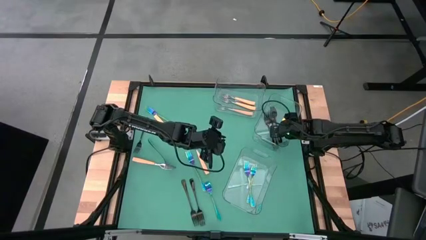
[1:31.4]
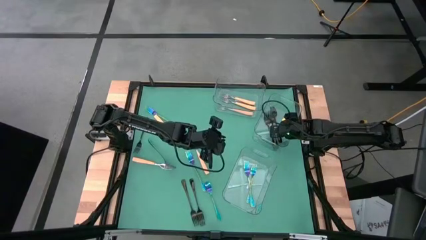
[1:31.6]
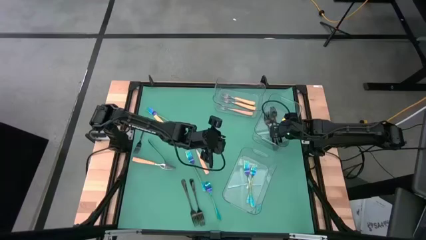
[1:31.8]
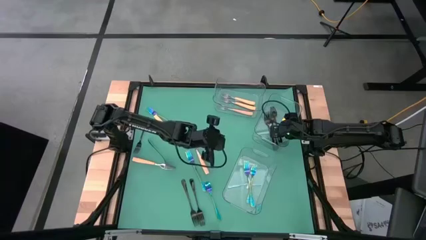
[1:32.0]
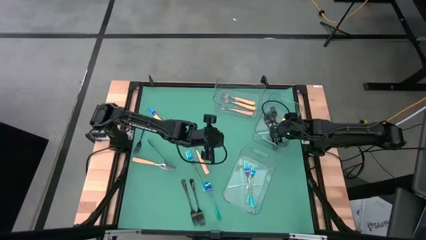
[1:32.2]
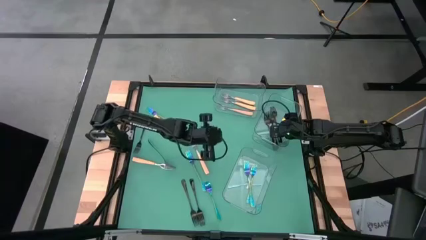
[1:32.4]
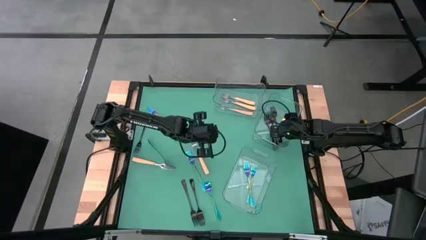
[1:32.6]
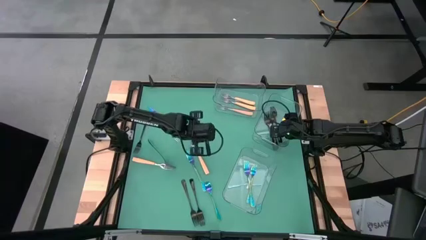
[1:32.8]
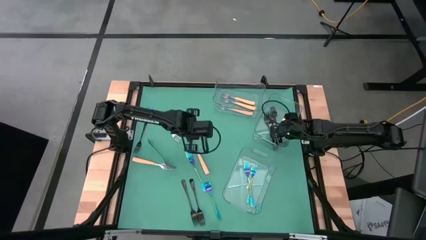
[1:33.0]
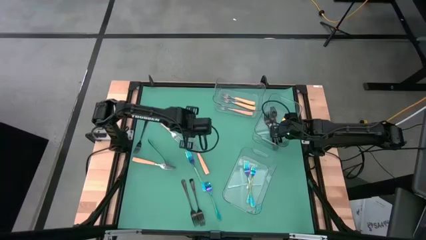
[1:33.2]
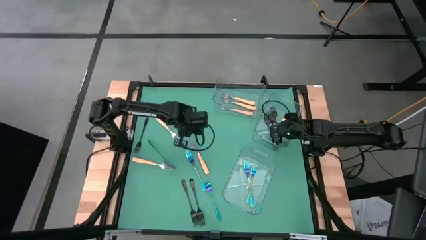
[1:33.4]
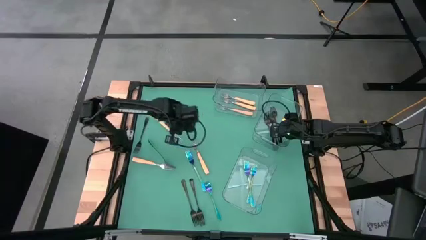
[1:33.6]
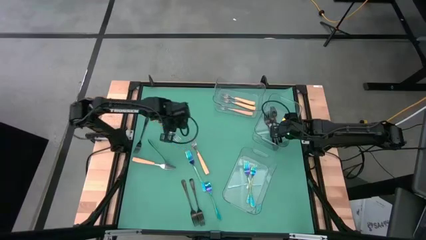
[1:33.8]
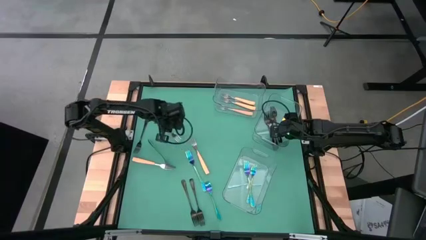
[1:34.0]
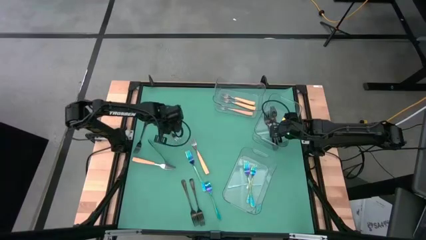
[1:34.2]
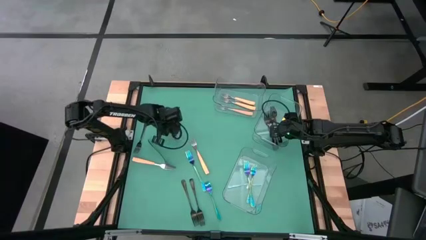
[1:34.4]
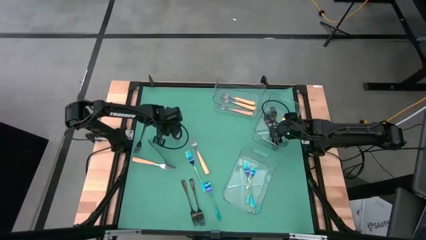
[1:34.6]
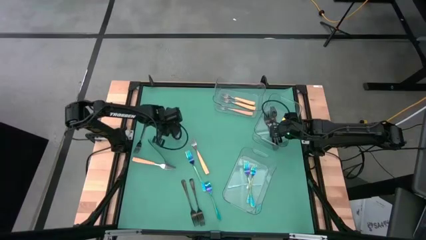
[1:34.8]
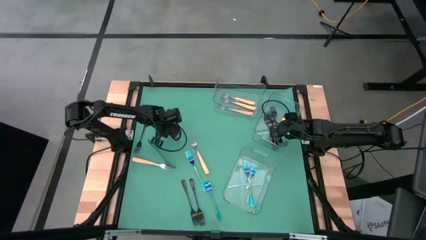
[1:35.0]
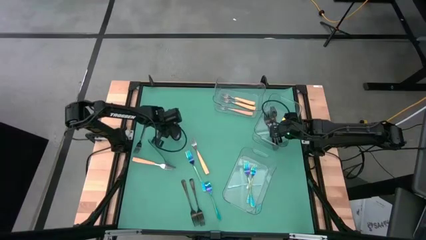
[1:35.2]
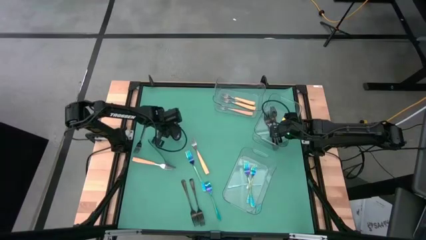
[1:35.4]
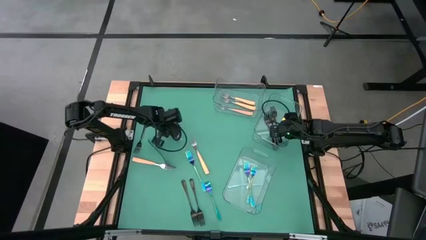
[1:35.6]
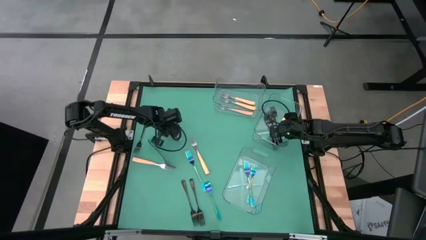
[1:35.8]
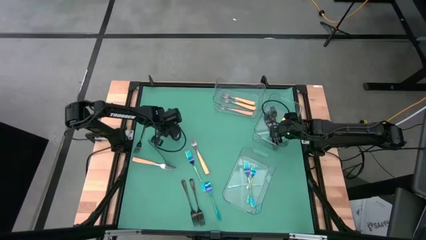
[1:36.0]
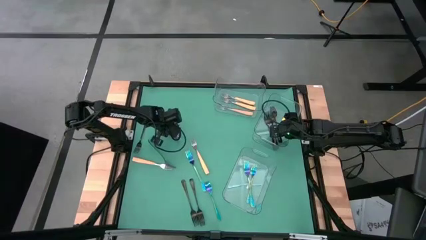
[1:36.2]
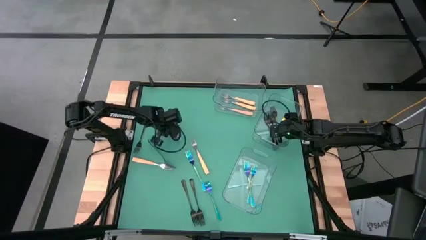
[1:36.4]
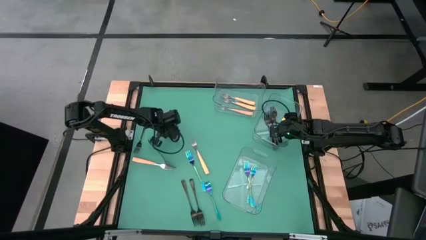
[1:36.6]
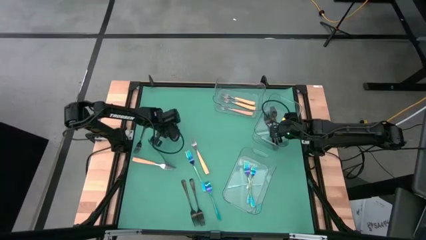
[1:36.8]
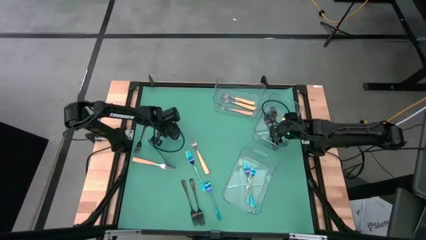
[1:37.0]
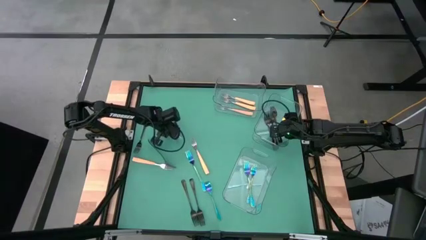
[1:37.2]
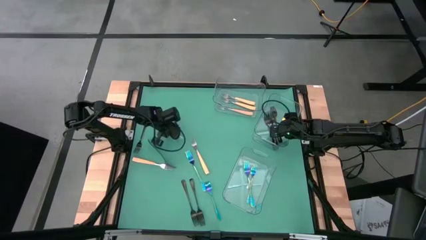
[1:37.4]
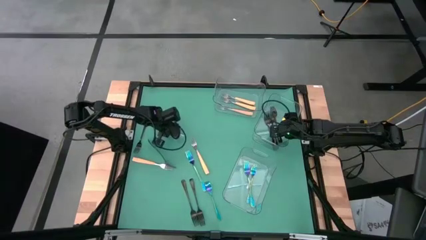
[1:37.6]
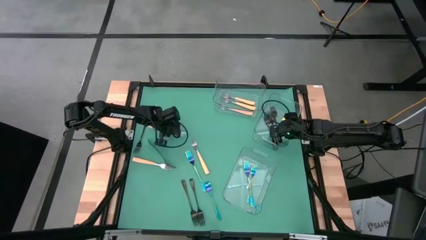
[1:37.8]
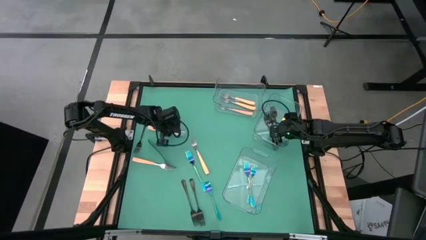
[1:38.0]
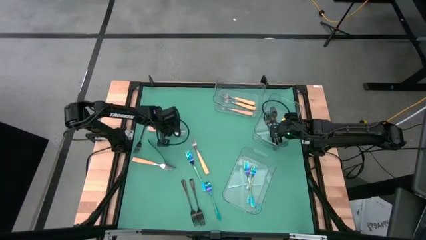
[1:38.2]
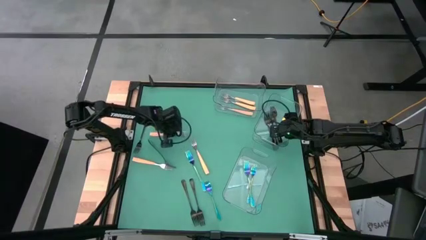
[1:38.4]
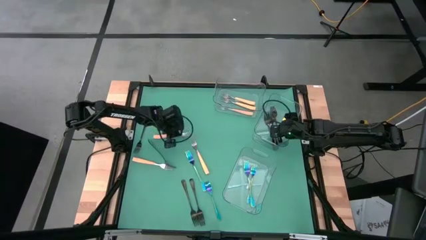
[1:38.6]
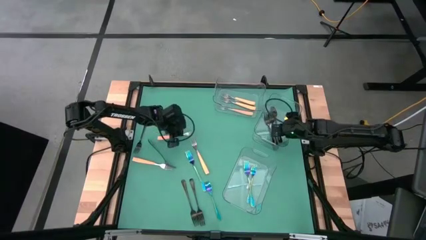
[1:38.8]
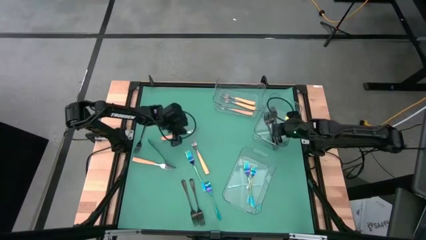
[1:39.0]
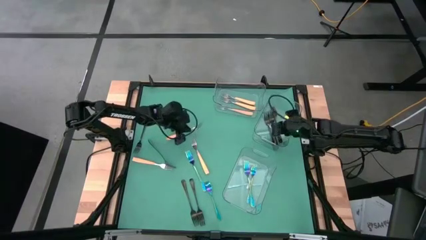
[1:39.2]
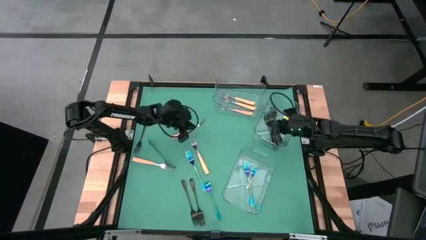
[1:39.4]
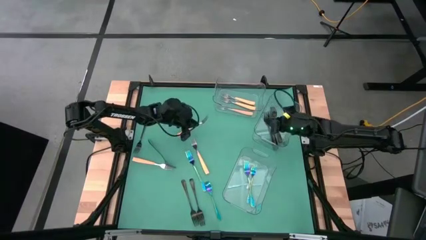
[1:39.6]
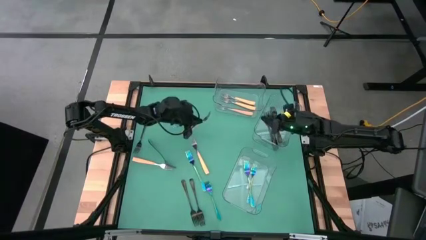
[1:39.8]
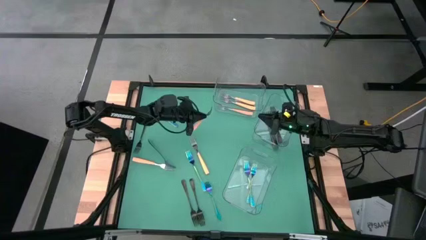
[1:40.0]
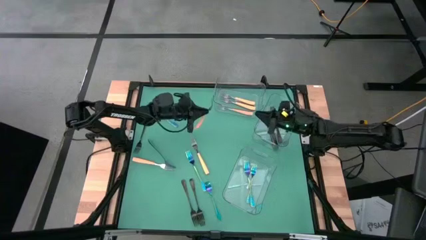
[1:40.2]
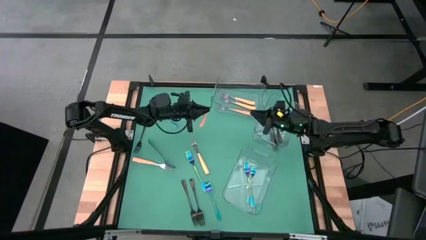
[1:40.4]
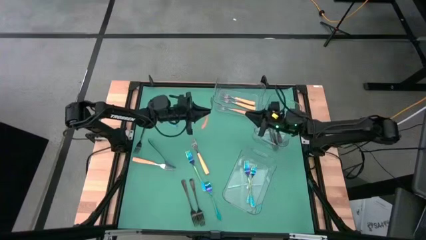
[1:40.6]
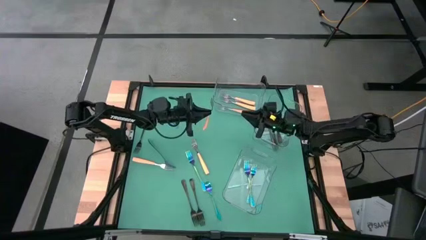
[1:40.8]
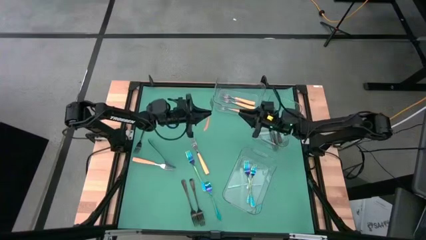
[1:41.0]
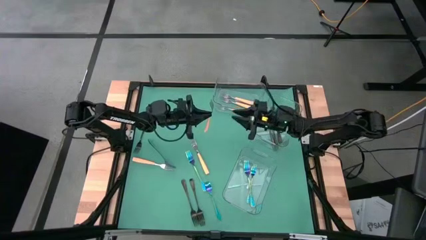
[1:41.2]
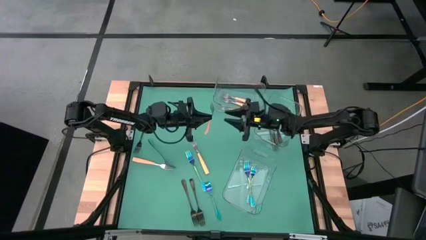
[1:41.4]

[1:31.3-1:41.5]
Task: Sort silverware by color (type)
Put the orange fork into the top transparent bin

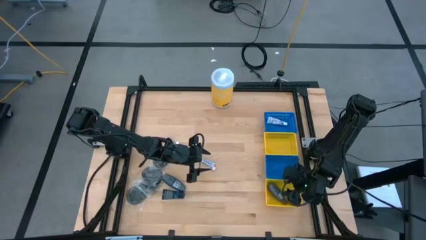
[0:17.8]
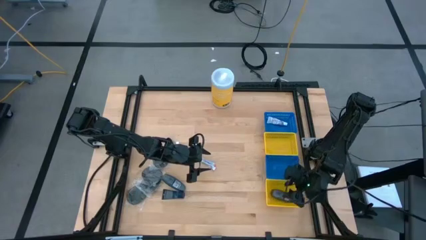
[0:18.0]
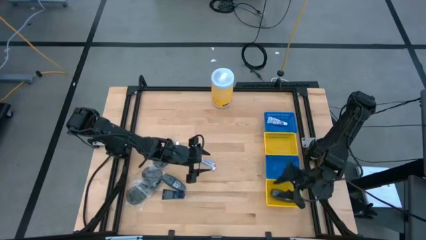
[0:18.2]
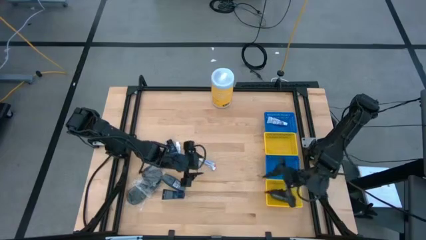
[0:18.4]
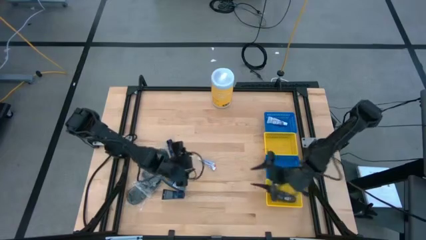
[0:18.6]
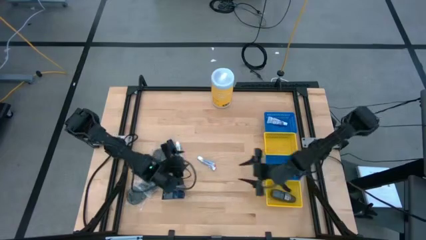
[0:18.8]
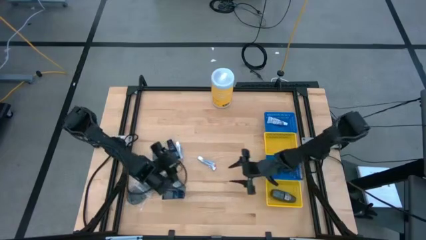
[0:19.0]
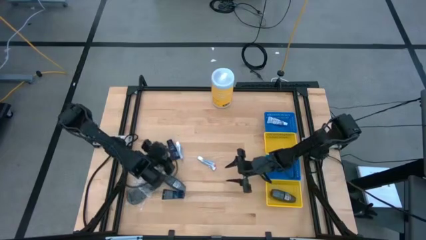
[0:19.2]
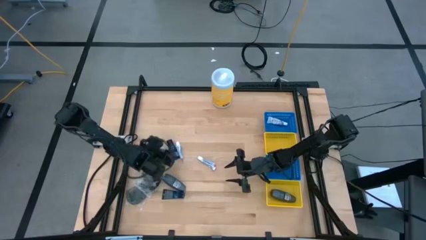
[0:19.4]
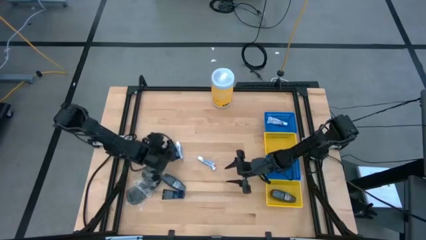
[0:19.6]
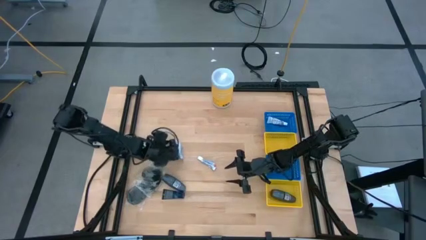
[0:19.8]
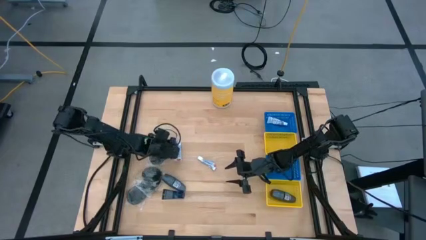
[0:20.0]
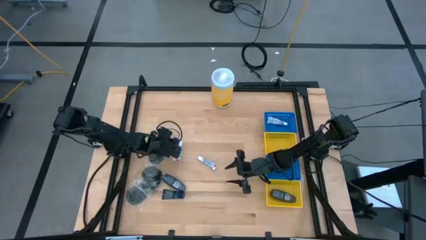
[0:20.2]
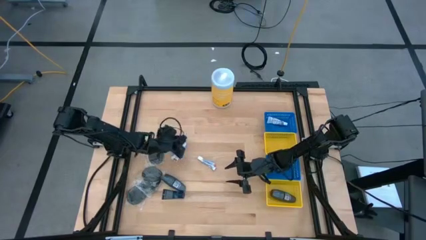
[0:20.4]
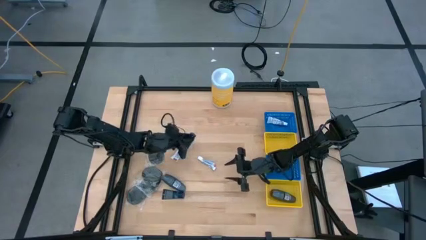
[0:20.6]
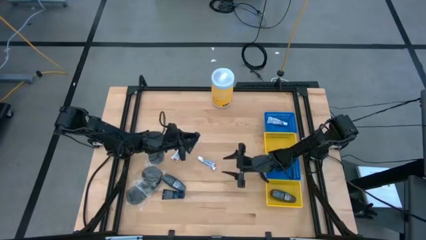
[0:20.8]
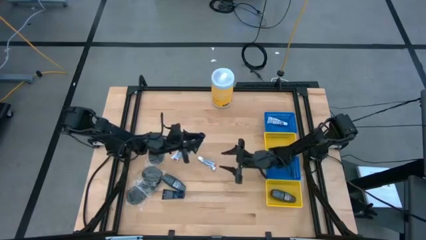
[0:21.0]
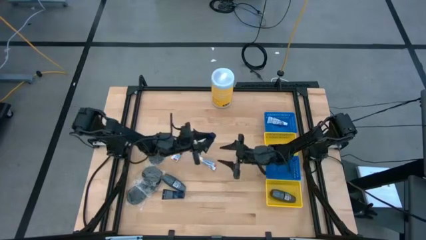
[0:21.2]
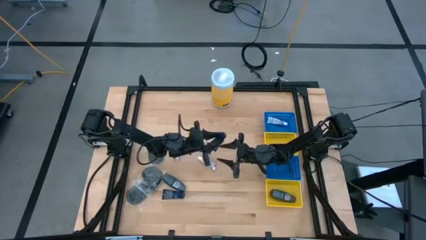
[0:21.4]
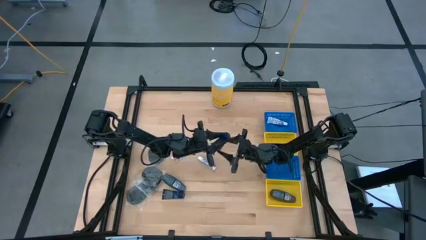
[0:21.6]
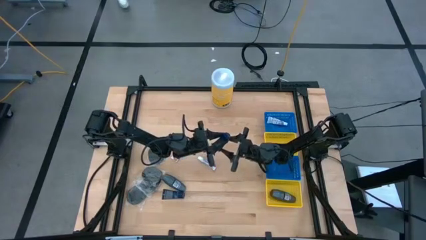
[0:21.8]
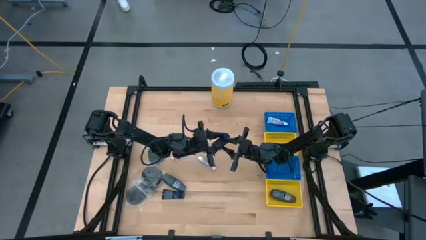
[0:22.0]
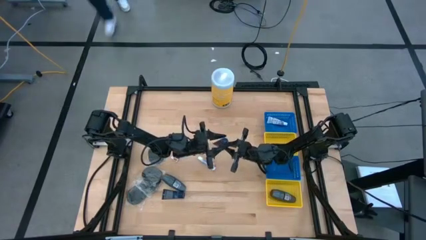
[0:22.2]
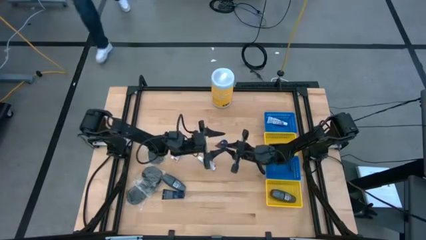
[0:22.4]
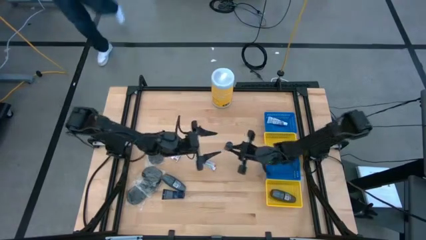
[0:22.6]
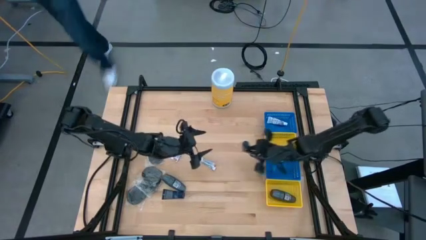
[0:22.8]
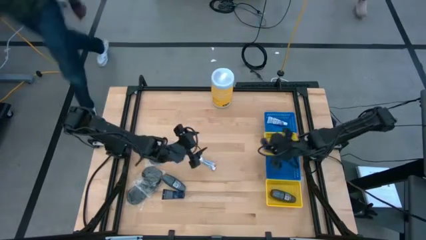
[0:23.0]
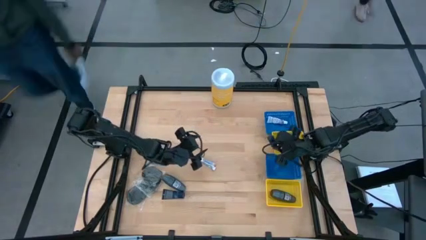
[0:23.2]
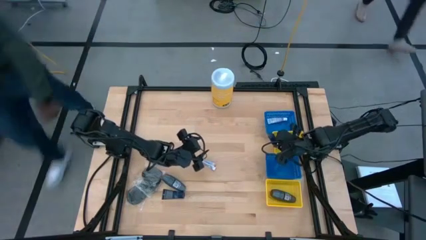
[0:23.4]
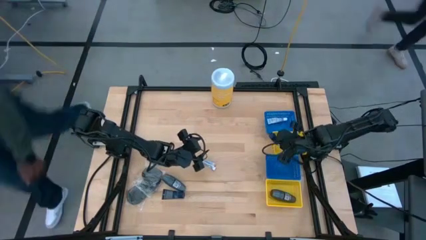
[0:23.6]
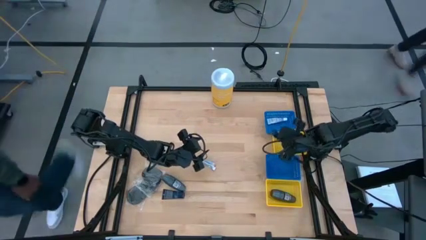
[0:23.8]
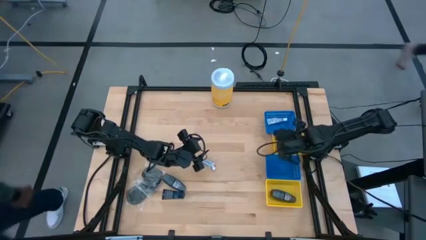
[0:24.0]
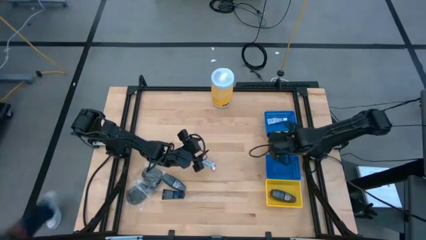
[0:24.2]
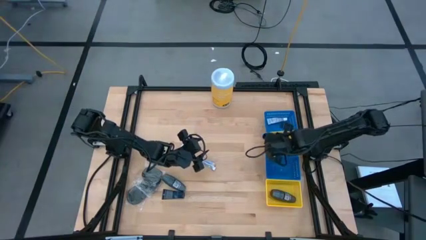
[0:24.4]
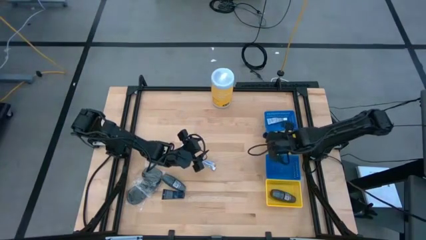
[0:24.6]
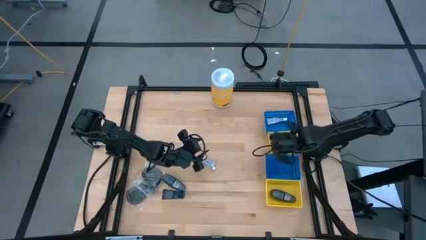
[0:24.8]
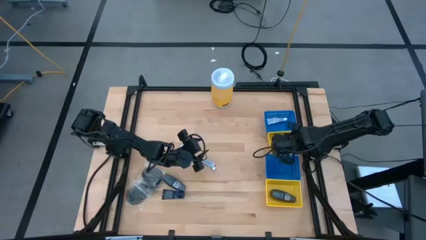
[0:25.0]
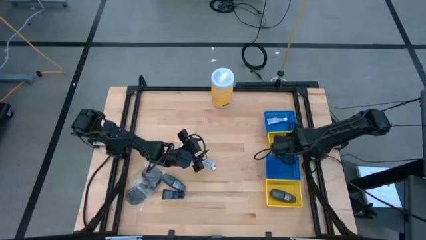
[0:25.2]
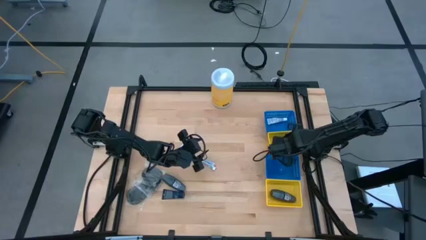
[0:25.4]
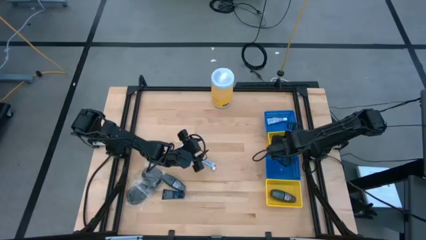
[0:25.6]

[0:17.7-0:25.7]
Task: Pick & Place Travel size toiletries
Put the blue shave cream into the top yellow bin
